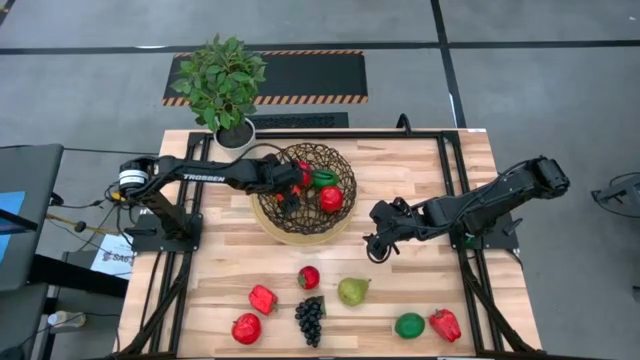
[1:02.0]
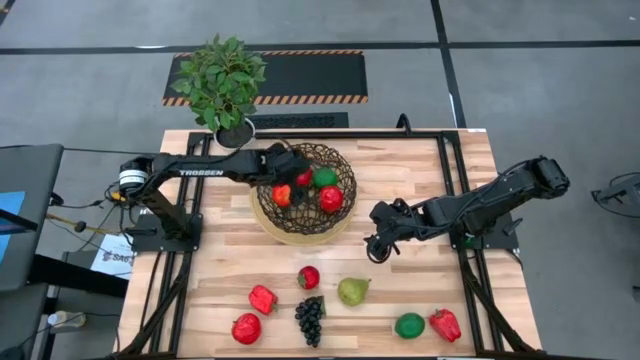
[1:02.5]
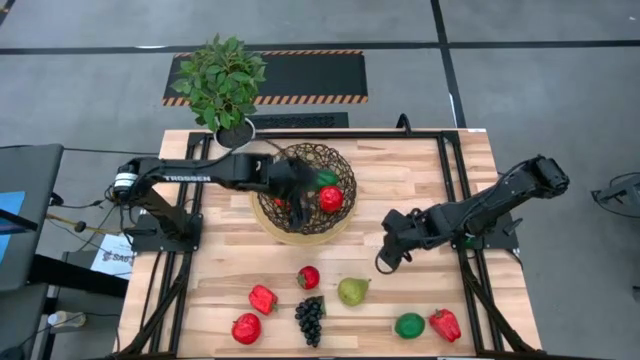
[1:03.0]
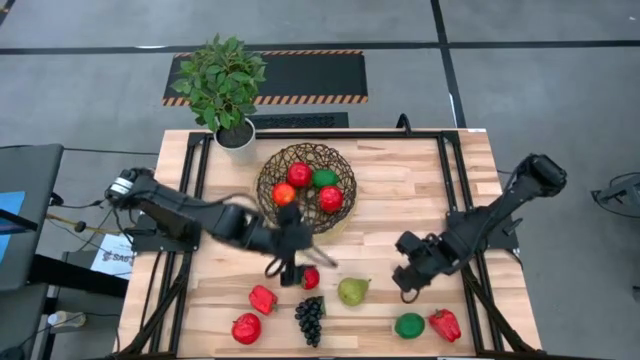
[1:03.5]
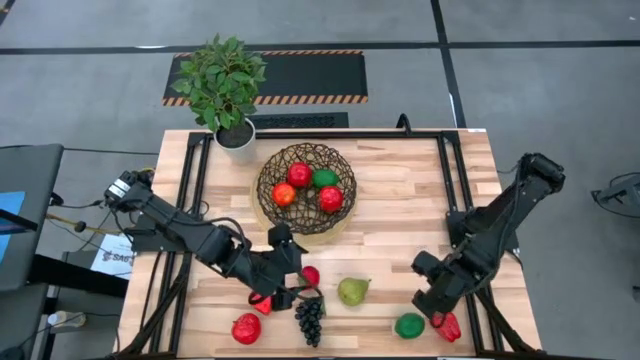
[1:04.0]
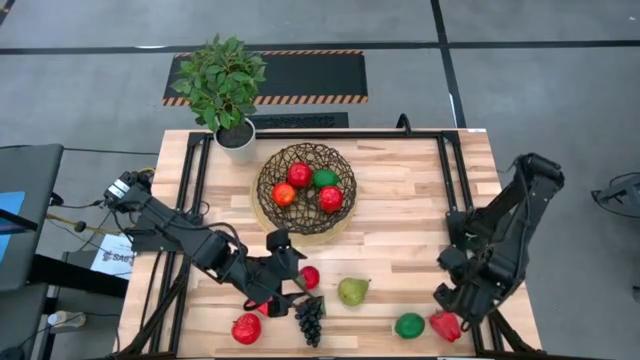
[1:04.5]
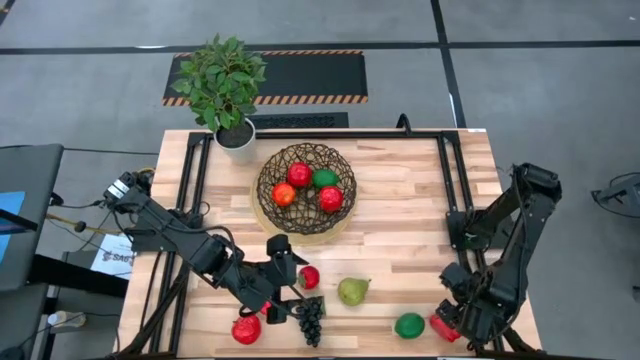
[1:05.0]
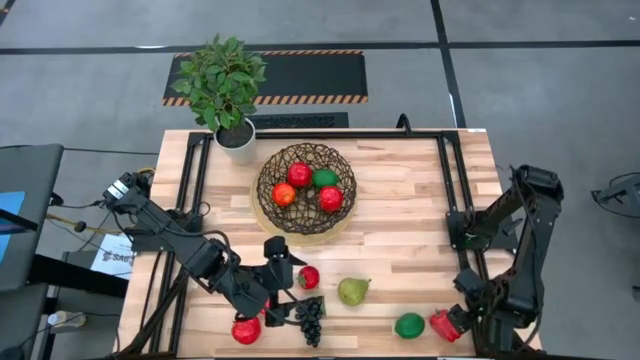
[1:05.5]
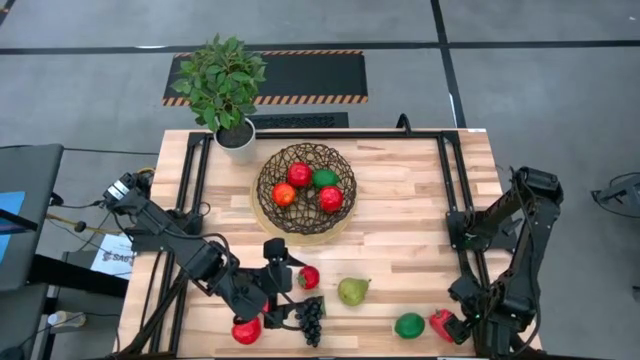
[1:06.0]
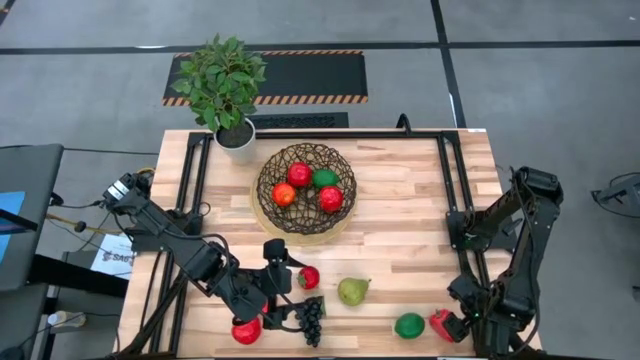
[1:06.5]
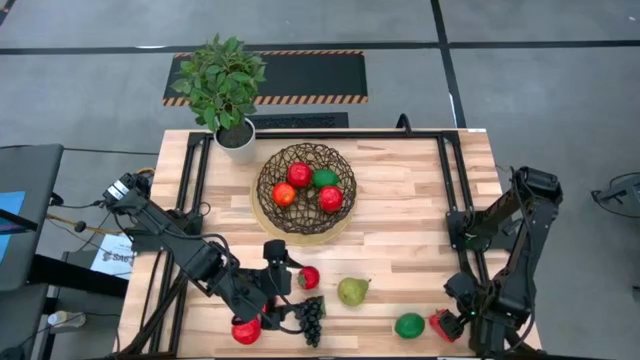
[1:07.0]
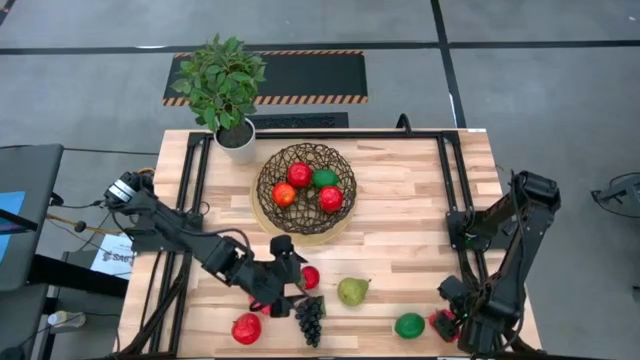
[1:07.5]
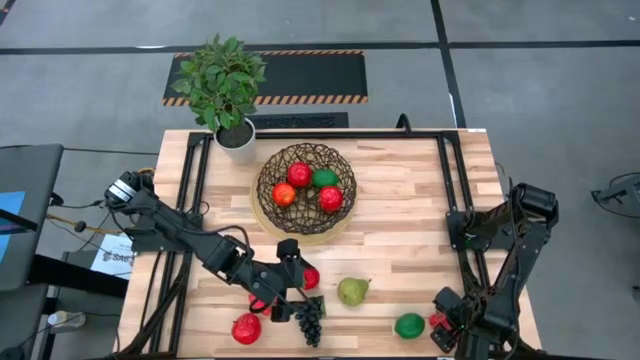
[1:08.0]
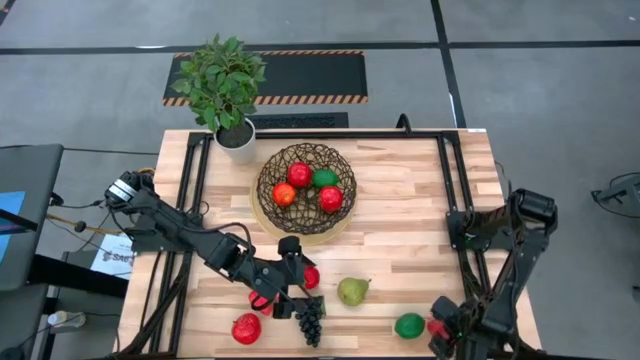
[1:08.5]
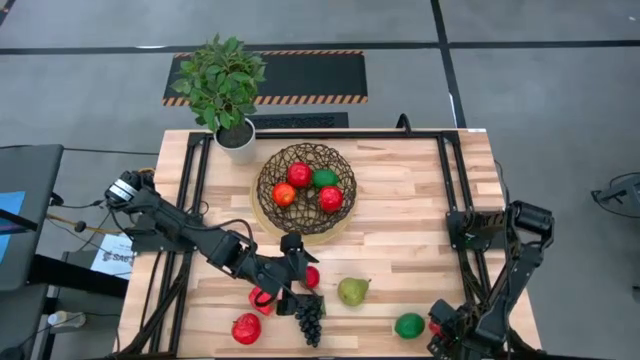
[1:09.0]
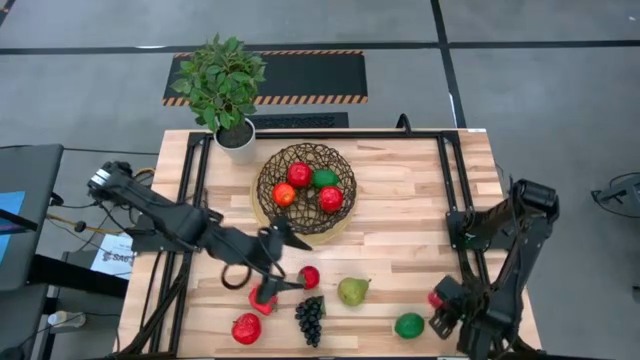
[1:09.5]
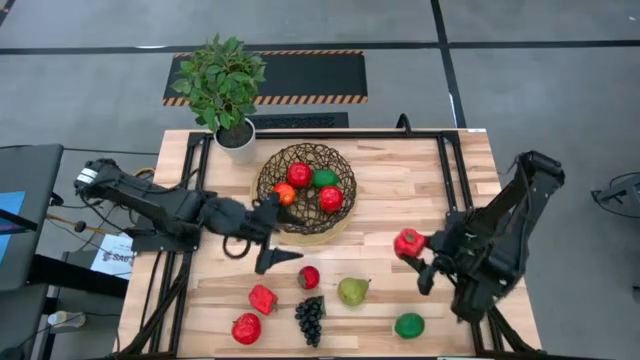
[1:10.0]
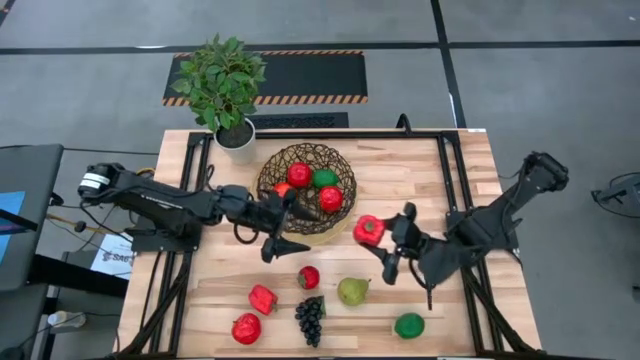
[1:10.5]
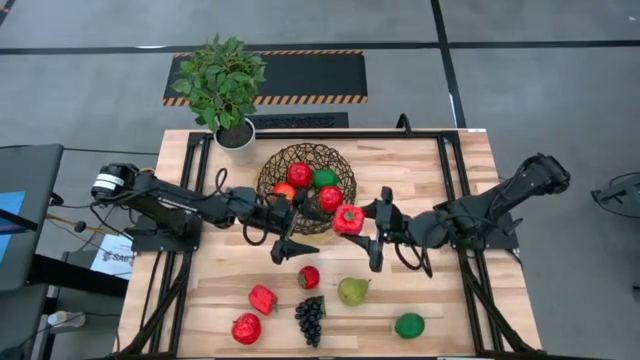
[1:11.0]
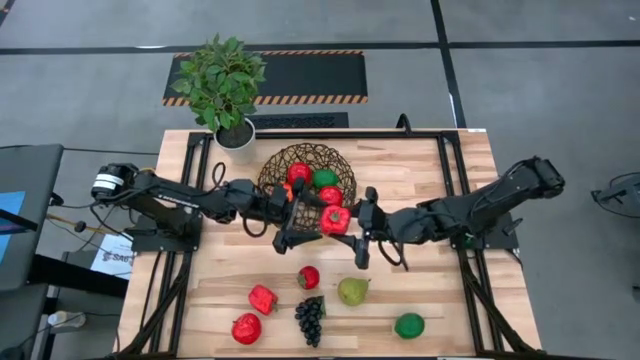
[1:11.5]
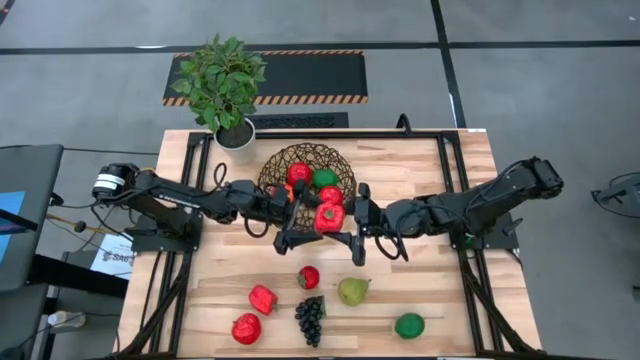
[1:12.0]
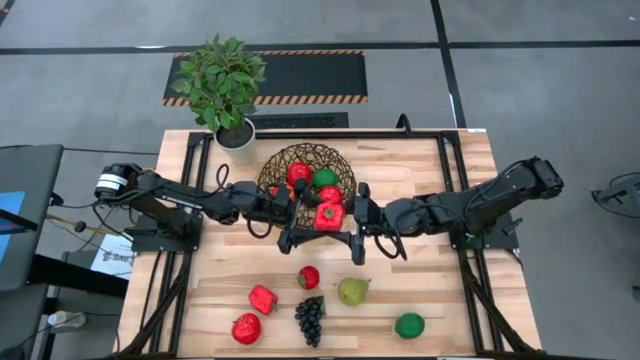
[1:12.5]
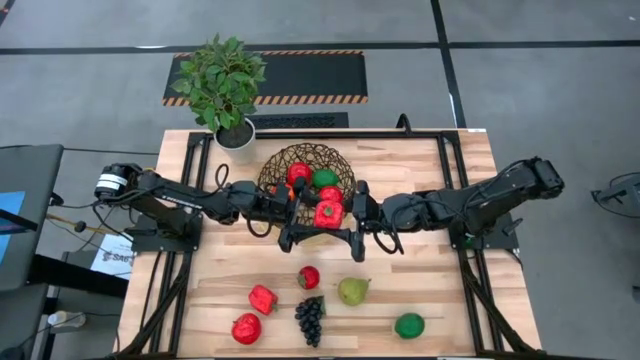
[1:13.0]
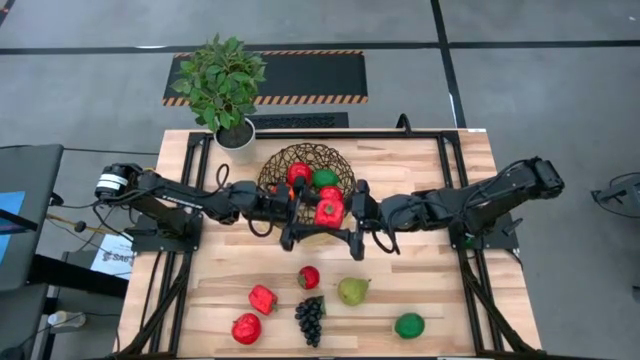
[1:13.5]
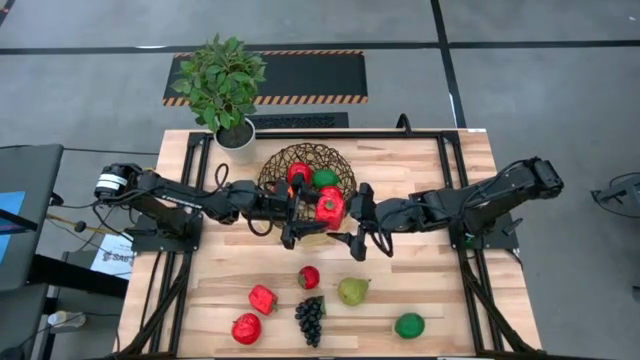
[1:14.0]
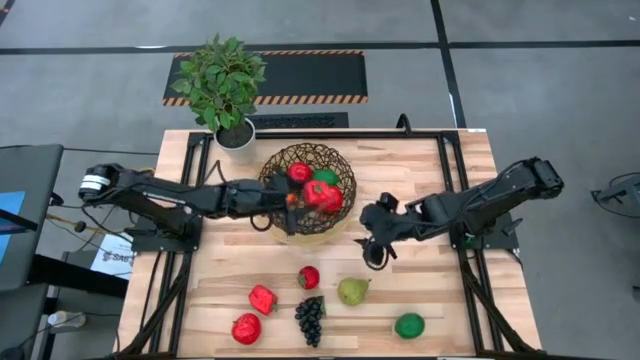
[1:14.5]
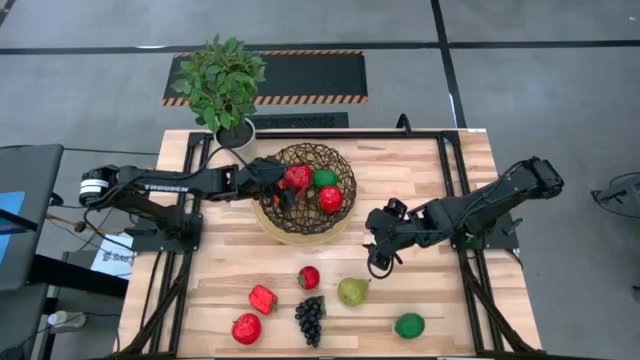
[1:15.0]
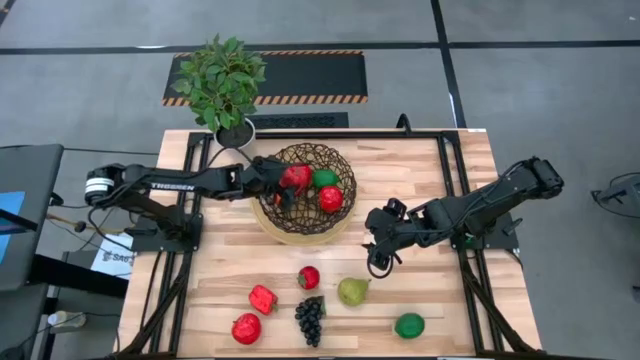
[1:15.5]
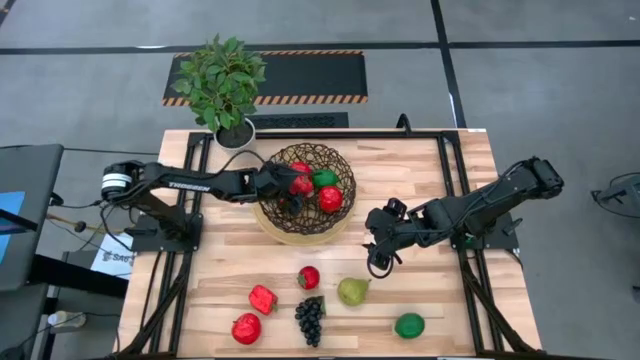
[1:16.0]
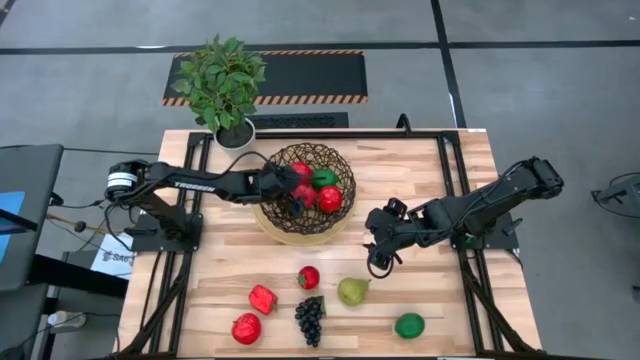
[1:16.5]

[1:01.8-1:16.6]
Task: Build produce basket
Put the right red bell pepper into the basket

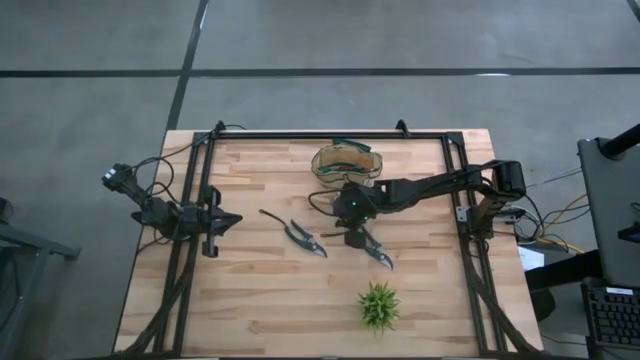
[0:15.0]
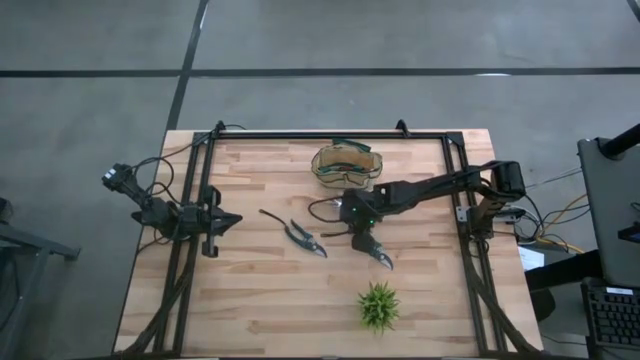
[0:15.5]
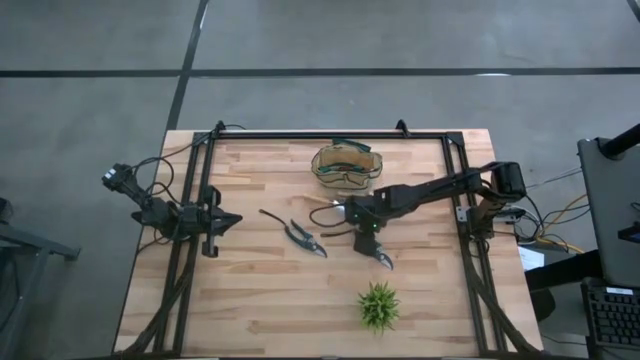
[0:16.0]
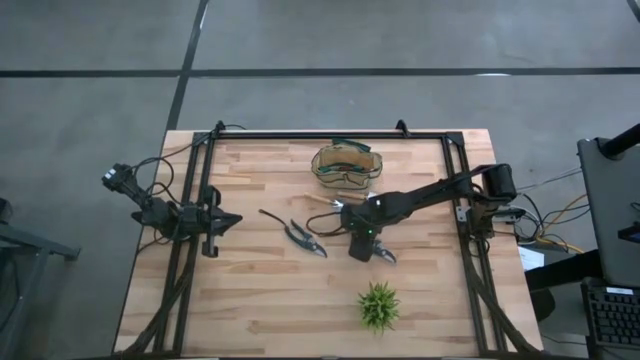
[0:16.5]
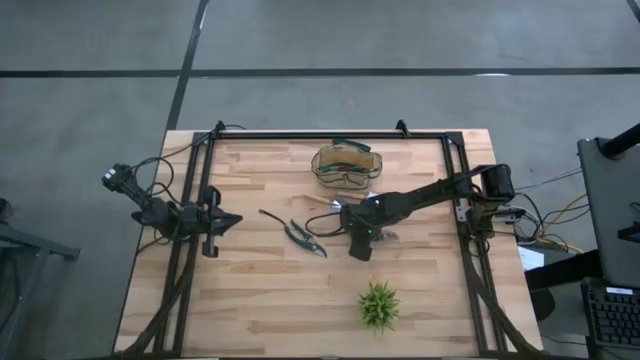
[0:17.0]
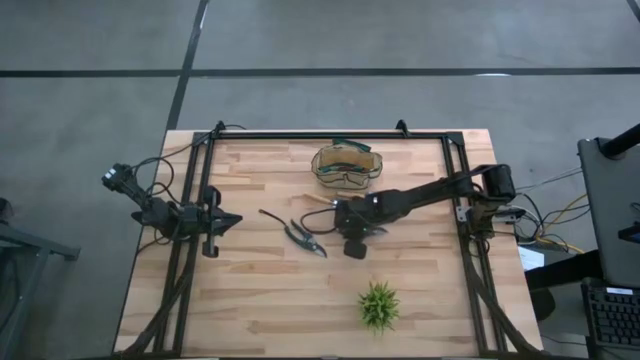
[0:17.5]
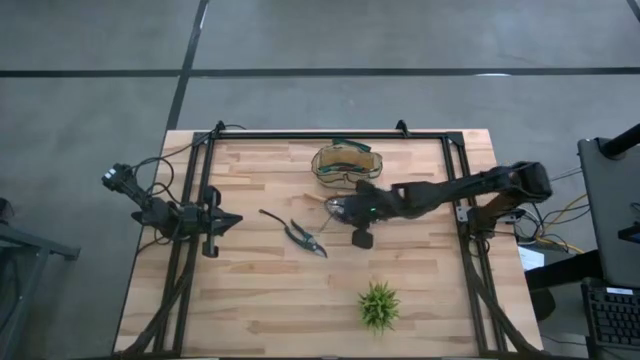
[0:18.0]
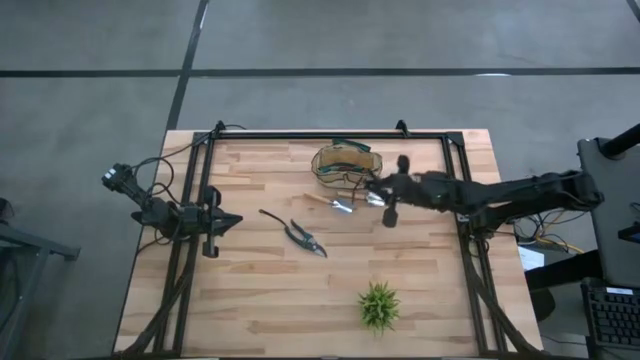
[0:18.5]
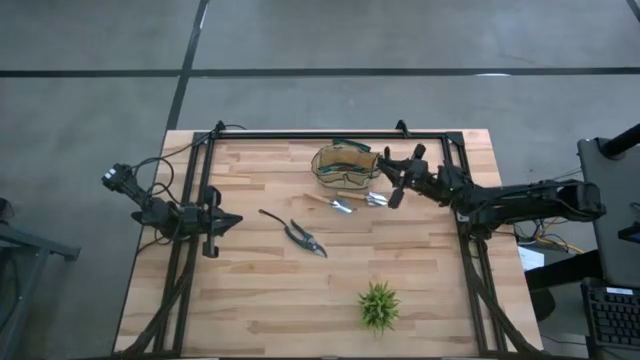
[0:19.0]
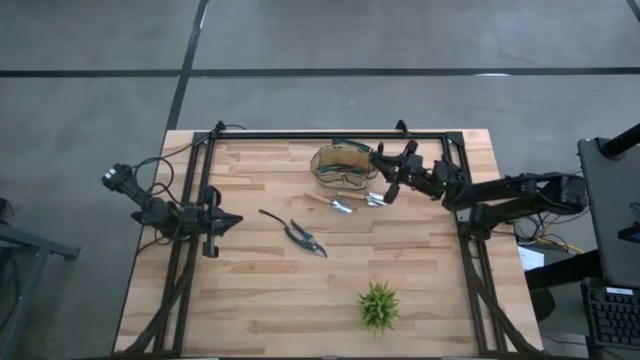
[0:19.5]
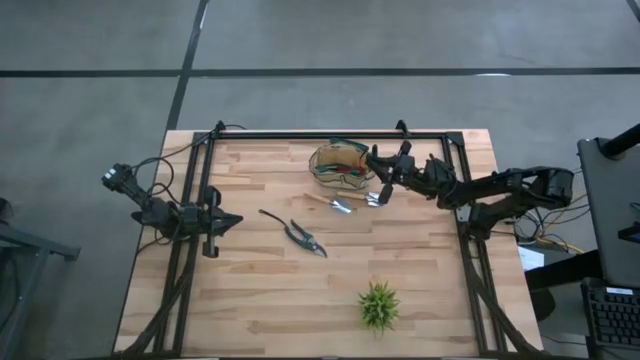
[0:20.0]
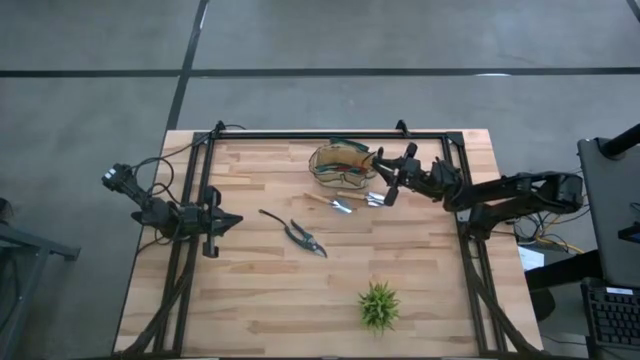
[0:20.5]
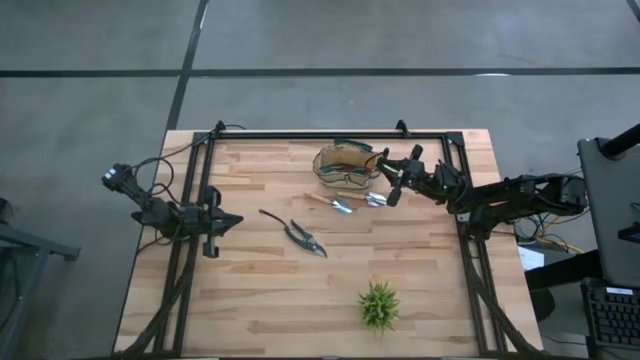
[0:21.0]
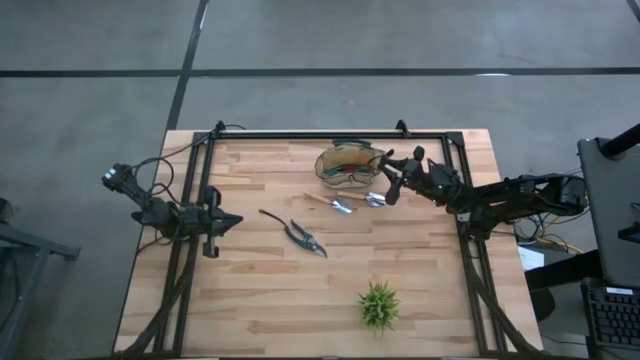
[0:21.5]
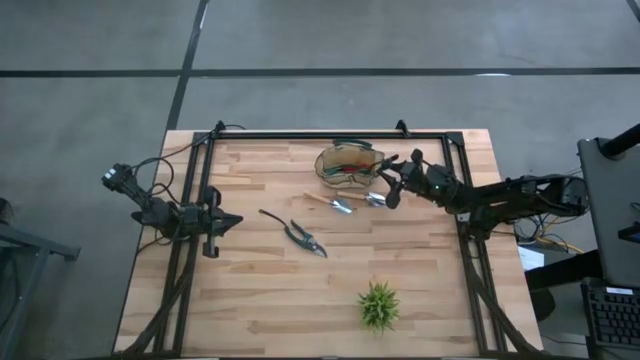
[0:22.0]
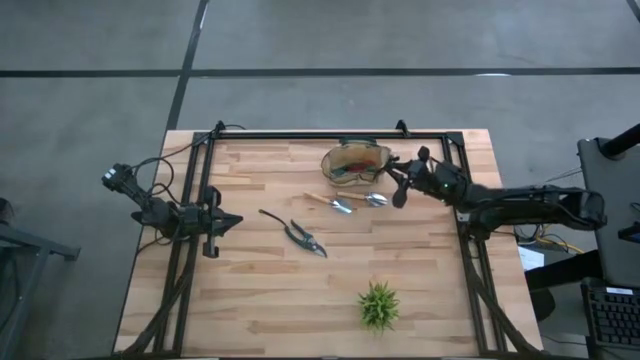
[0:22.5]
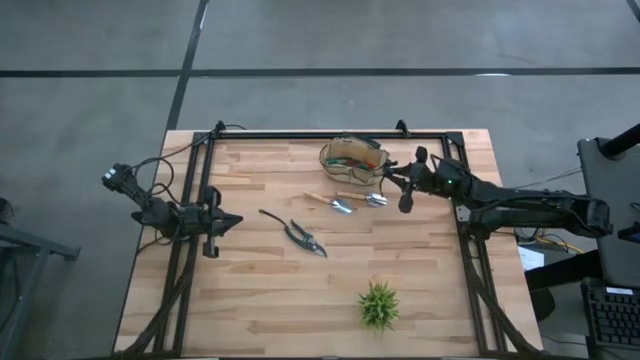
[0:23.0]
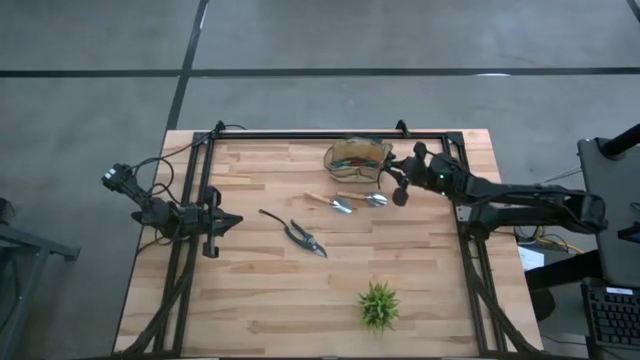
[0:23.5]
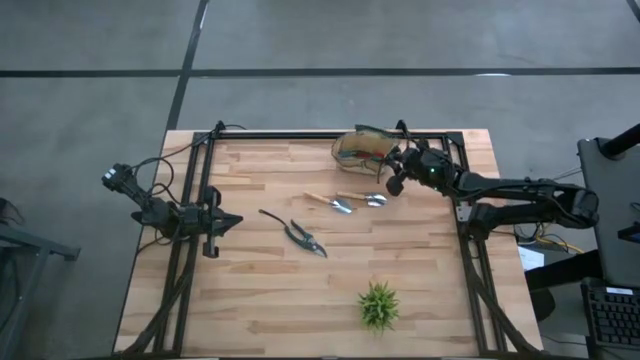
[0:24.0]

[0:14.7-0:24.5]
Task: Pick & Place Garden tools in Gardening bag
Put the green shear scissors into the gardening bag
